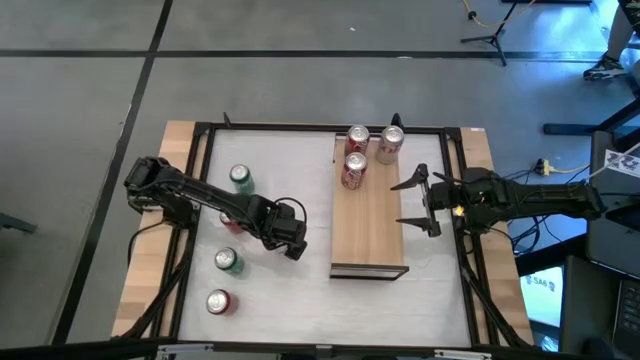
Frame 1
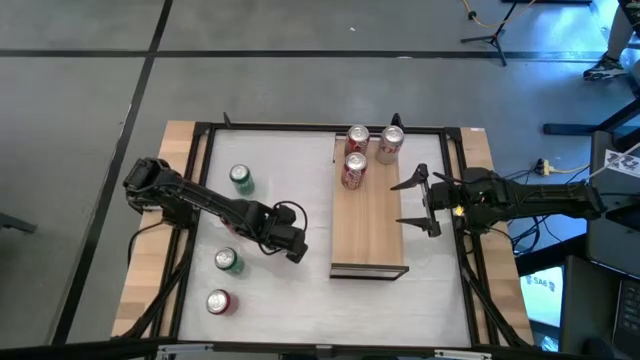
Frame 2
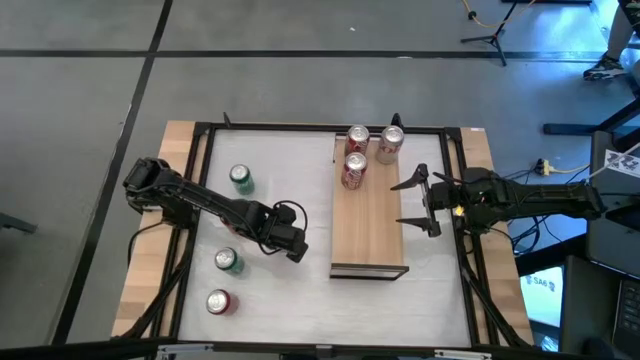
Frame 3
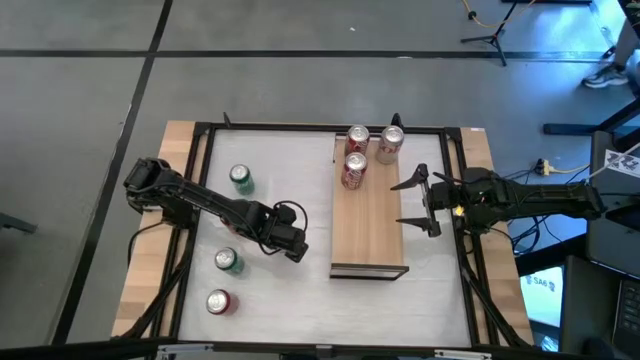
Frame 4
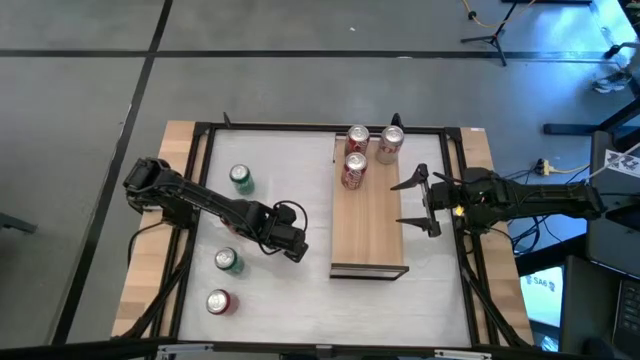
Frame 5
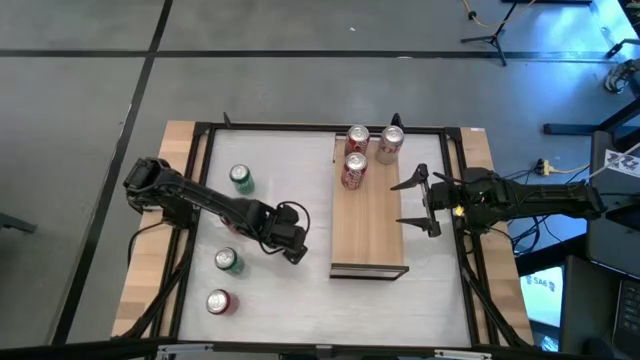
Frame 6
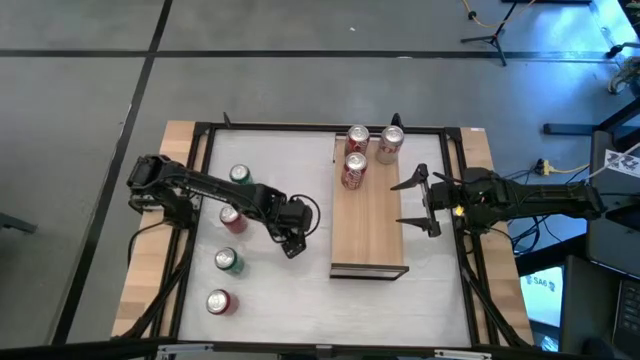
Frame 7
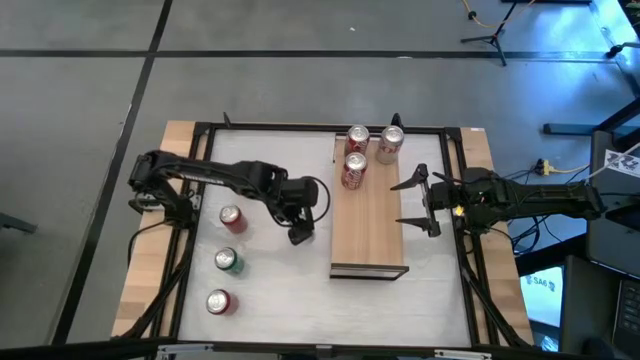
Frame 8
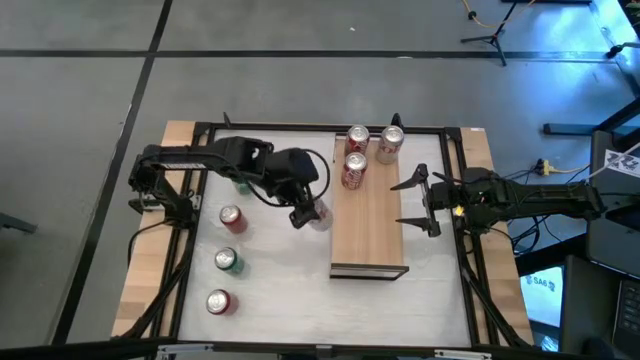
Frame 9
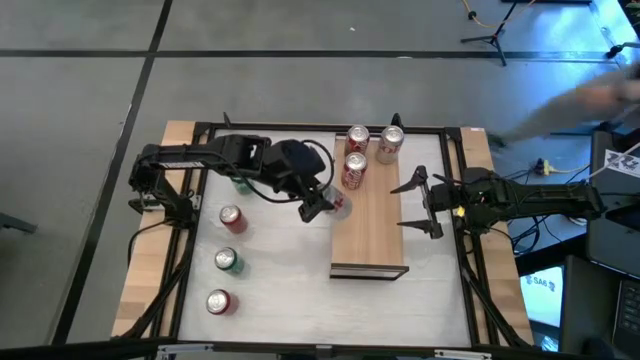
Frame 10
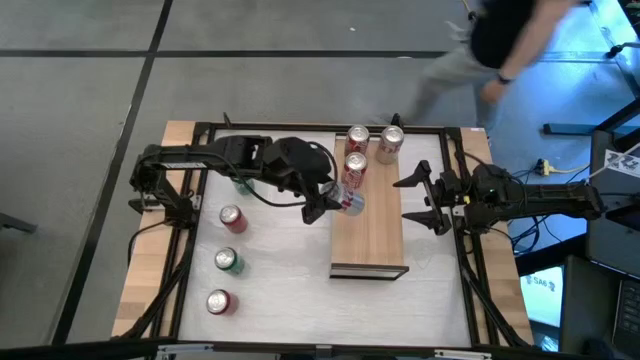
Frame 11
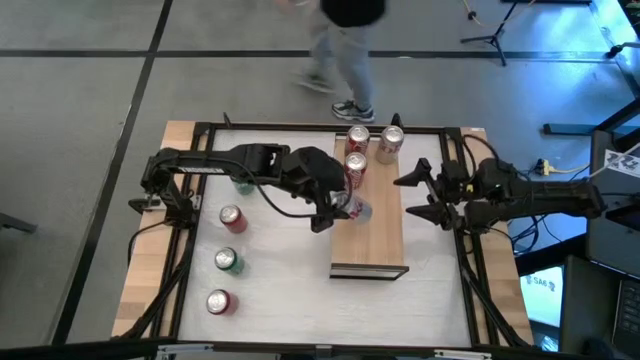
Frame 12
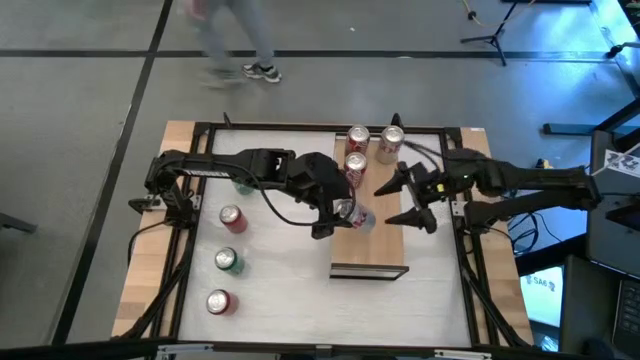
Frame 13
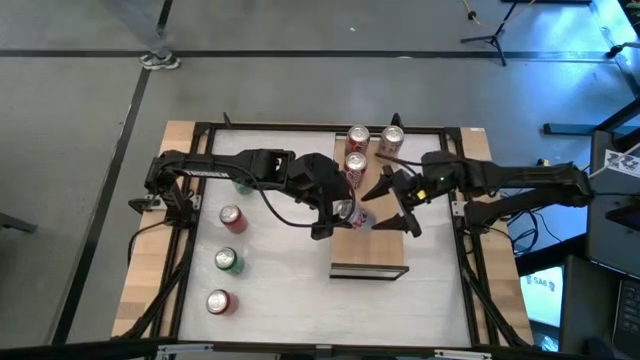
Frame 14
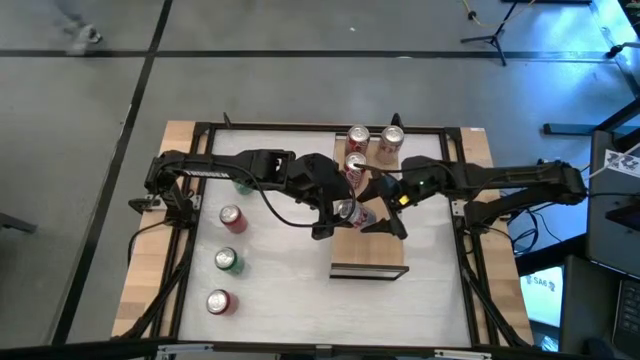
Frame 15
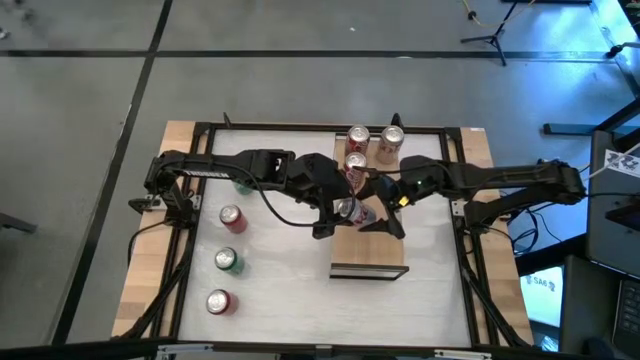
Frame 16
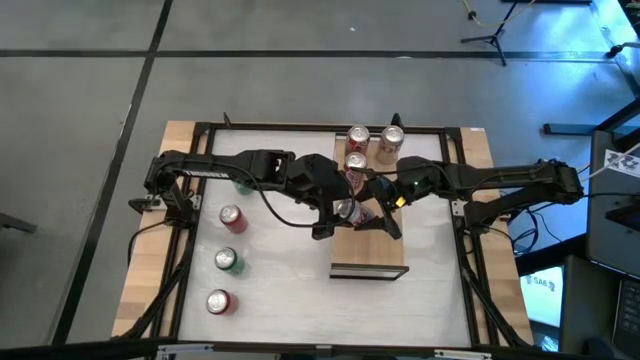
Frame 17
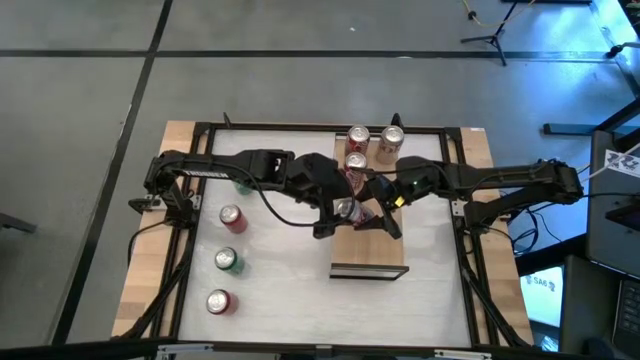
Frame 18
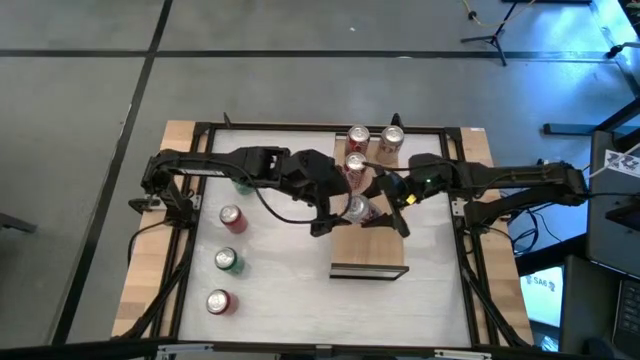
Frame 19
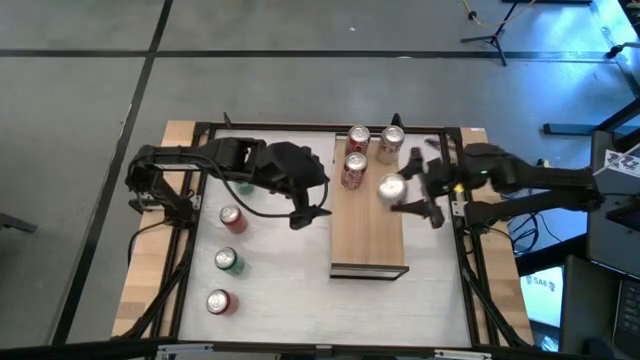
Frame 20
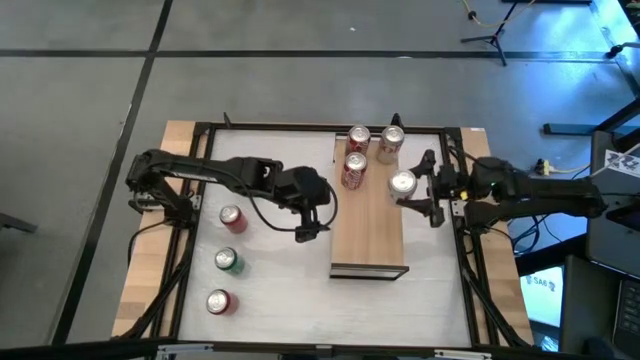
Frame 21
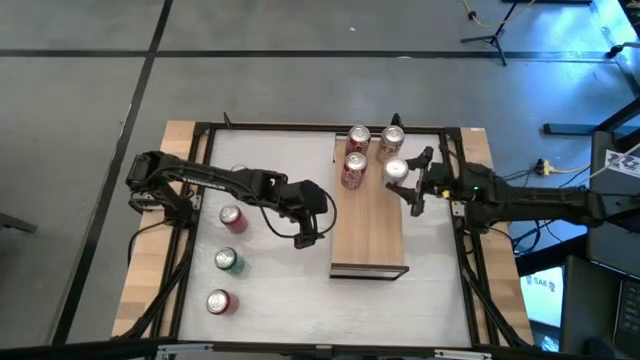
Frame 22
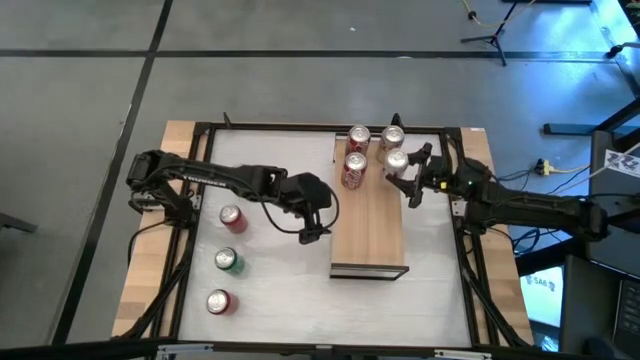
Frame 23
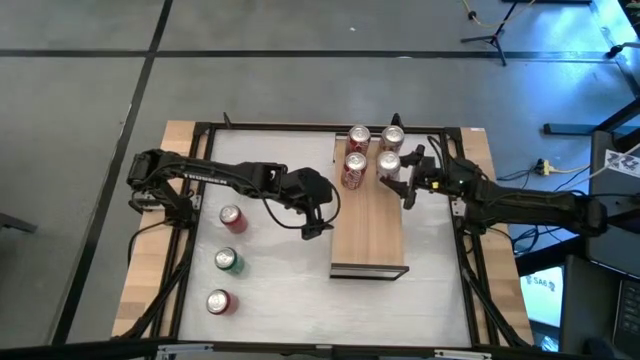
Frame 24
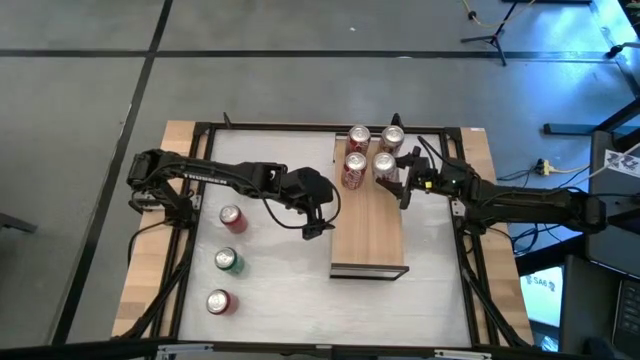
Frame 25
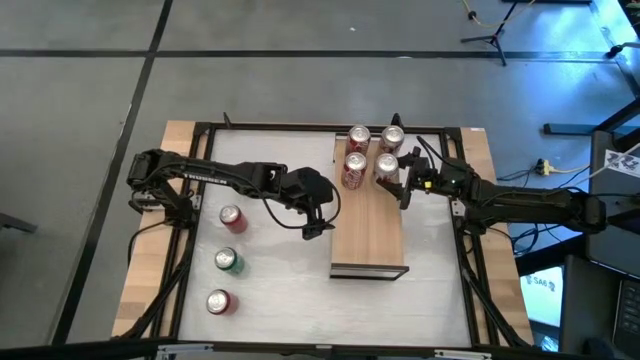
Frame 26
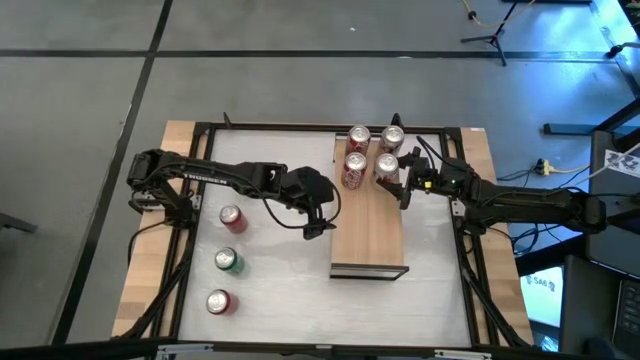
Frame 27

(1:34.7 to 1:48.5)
Task: Place canned beverage on shelf
Put the silver soda can on the shelf aligned with the other silver soda can

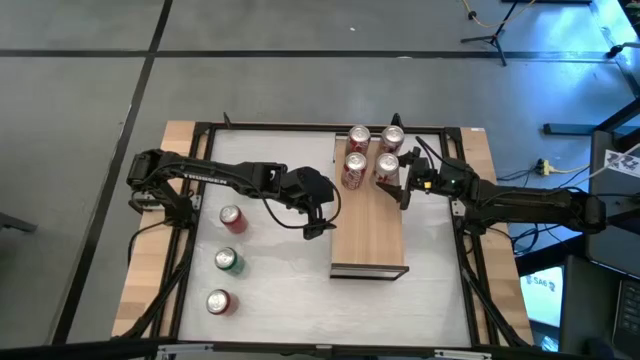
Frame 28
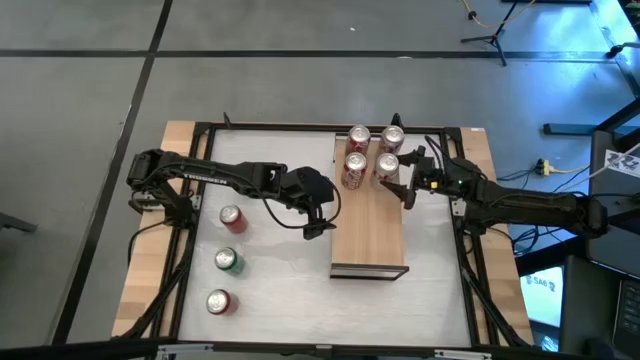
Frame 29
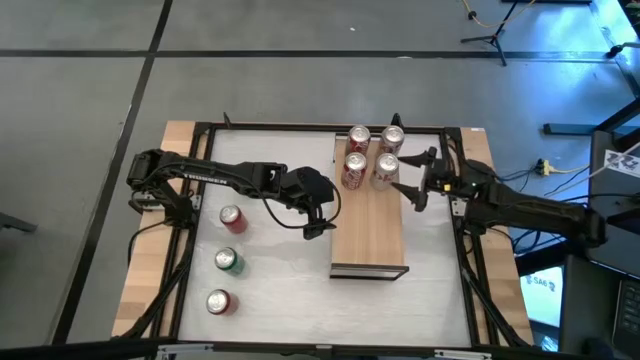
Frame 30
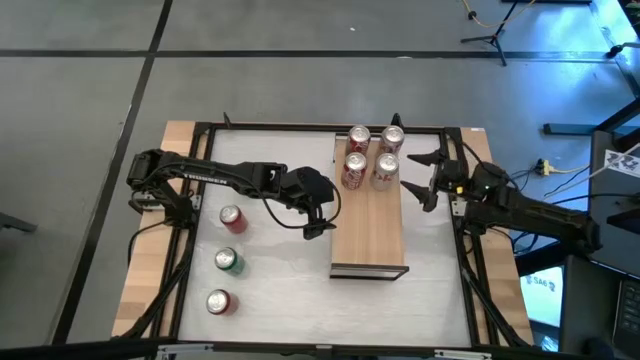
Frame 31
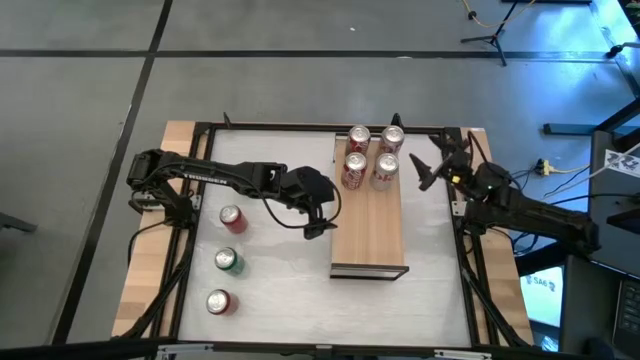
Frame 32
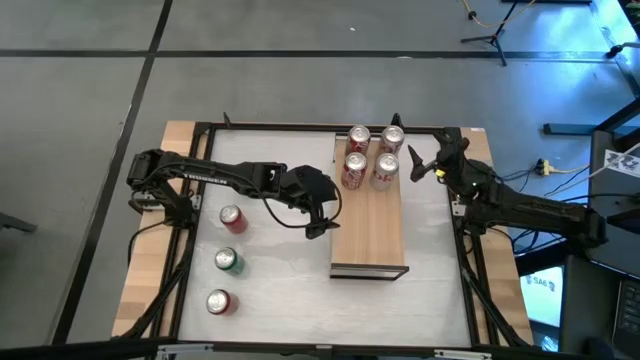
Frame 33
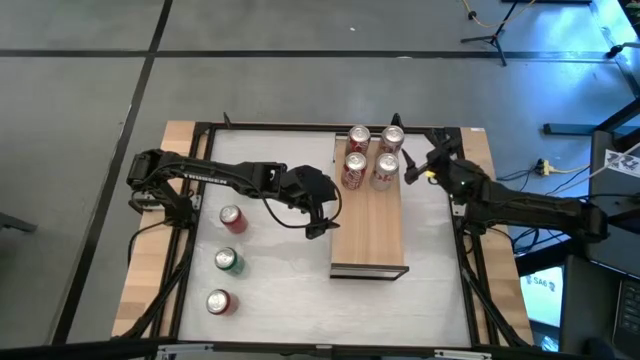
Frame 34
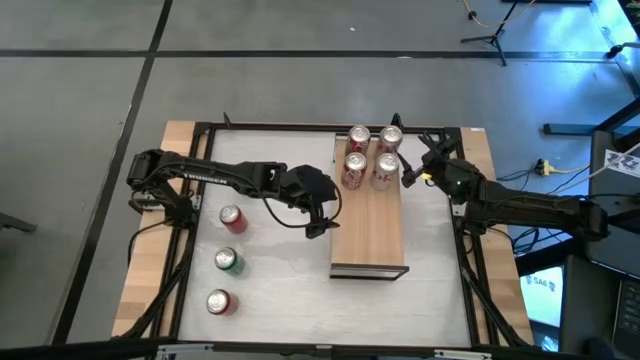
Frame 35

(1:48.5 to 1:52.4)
Adjust the silver soda can on the shelf

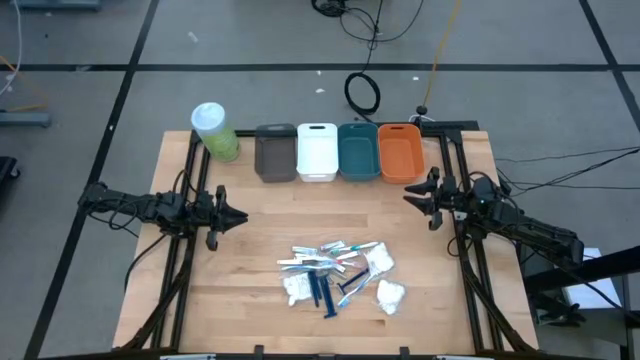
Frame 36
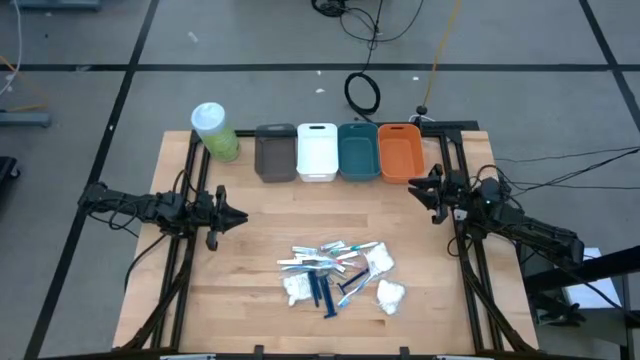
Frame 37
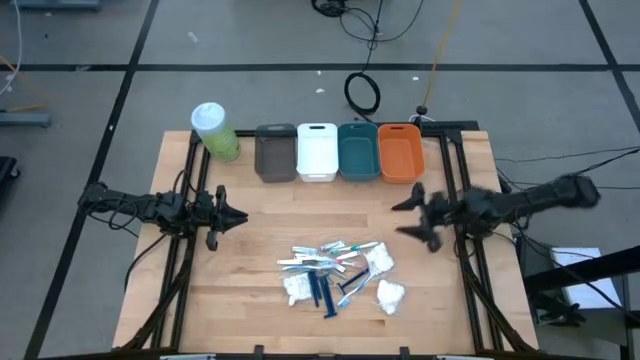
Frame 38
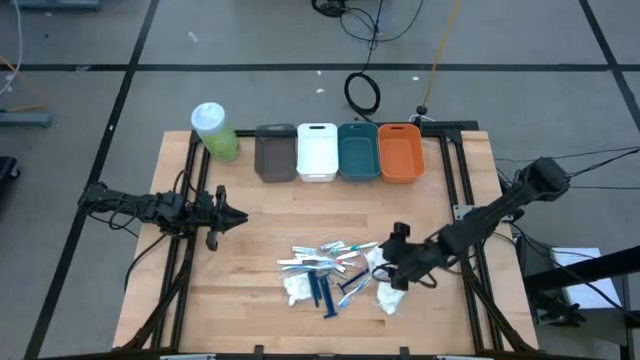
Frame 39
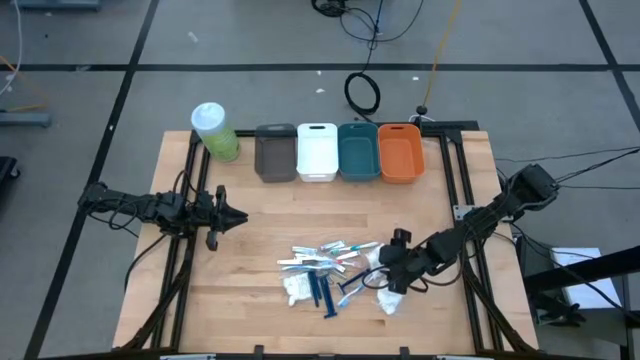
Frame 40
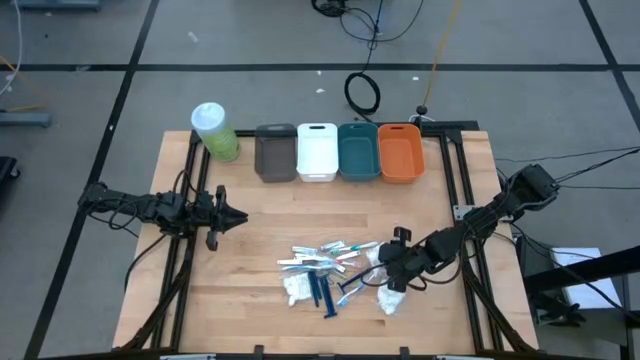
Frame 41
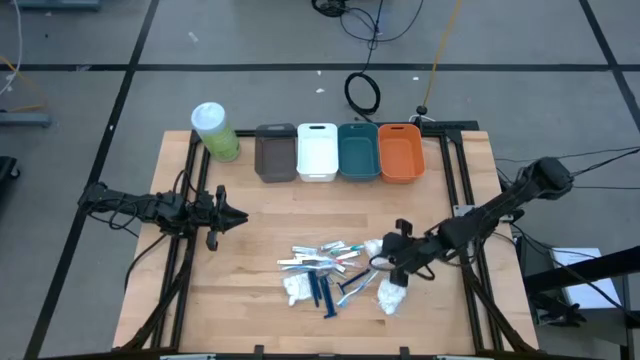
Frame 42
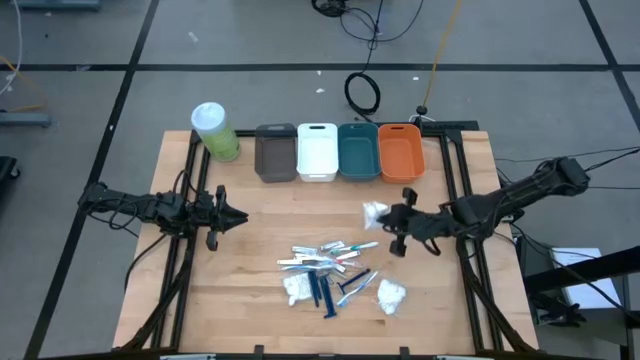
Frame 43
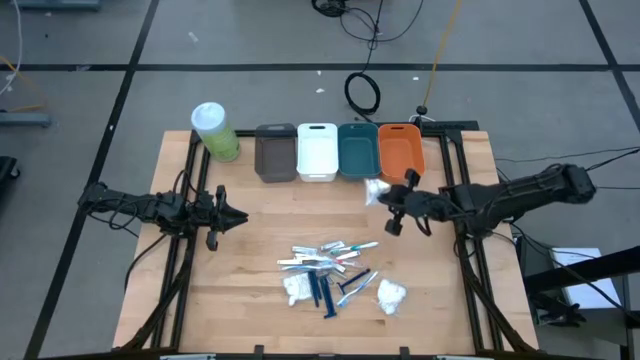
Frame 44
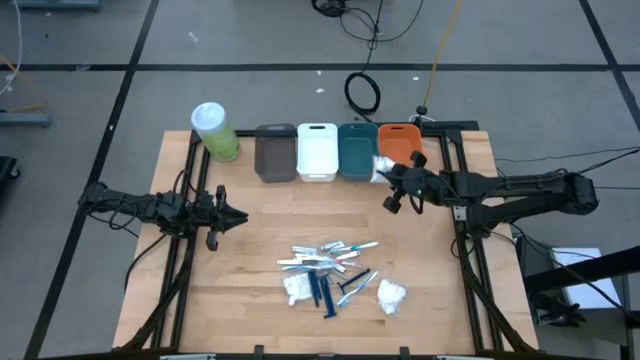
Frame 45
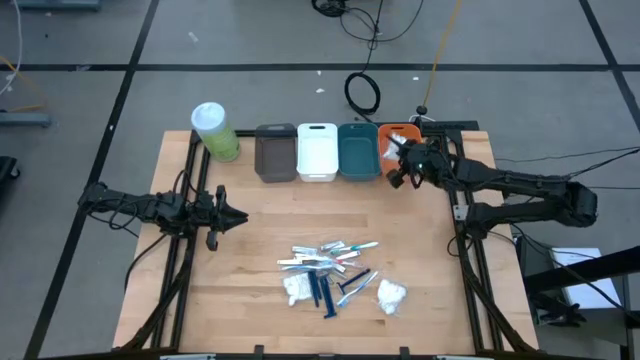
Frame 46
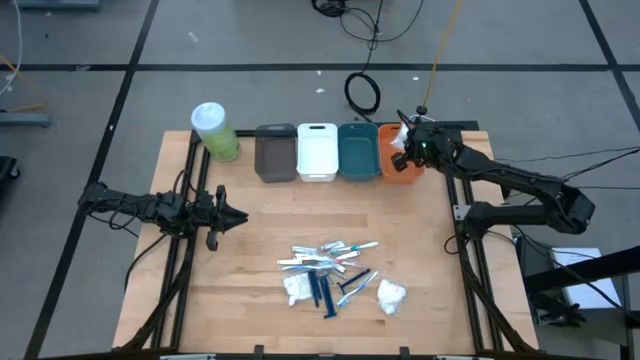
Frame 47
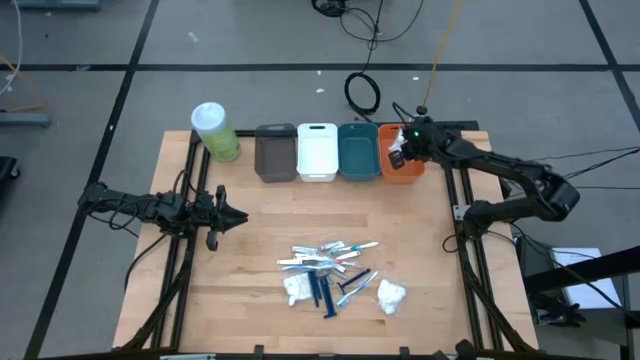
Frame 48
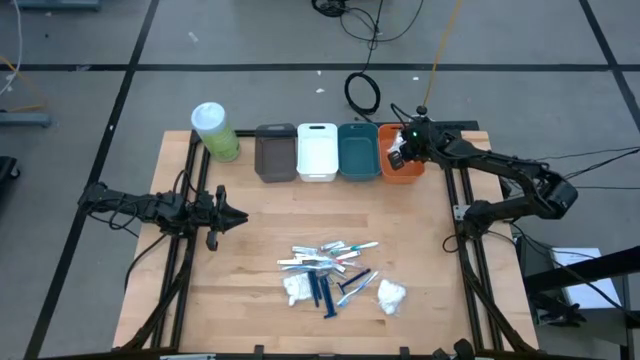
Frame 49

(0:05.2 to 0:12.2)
Task: Pick & Place Travel size toiletries
Put the white cotton pack into the orange bin
